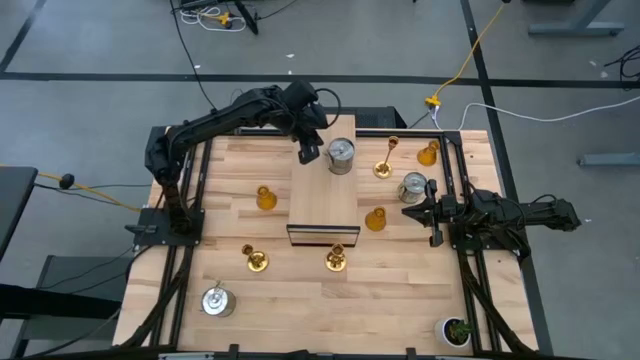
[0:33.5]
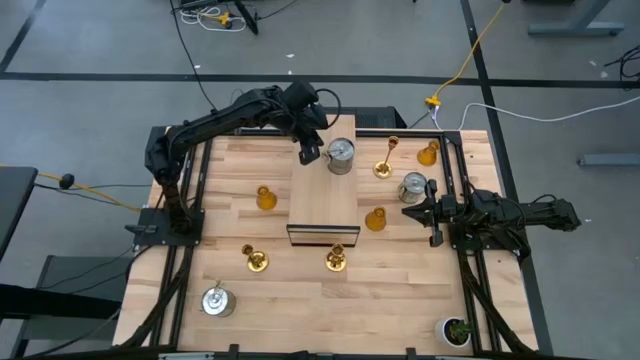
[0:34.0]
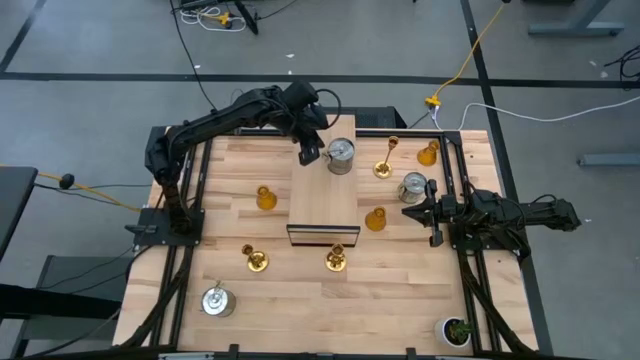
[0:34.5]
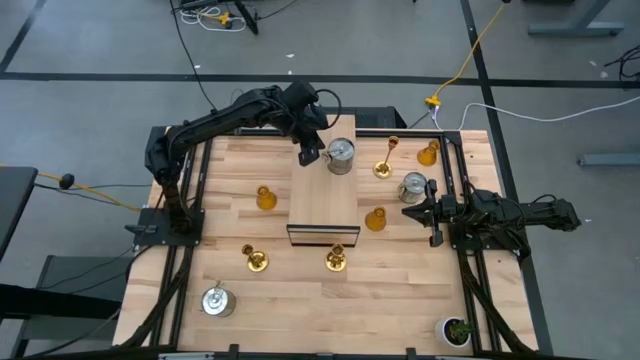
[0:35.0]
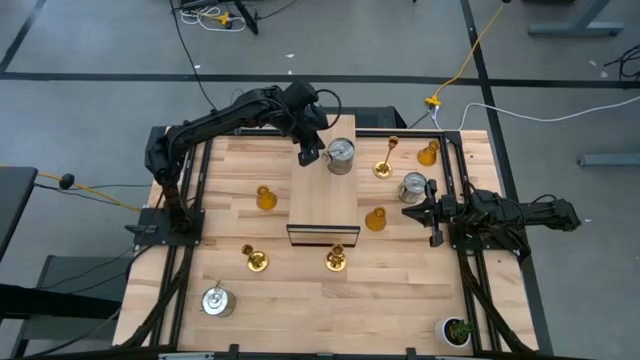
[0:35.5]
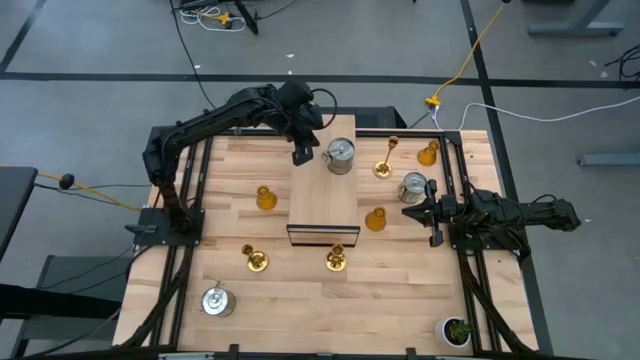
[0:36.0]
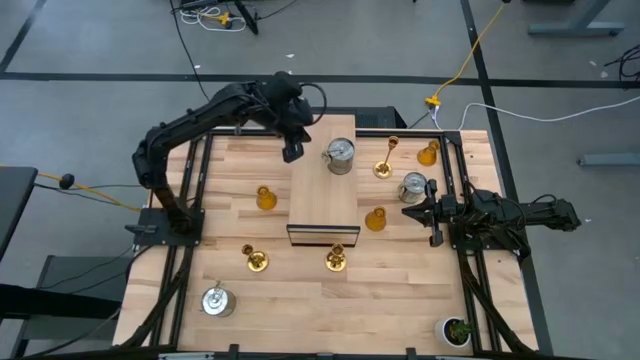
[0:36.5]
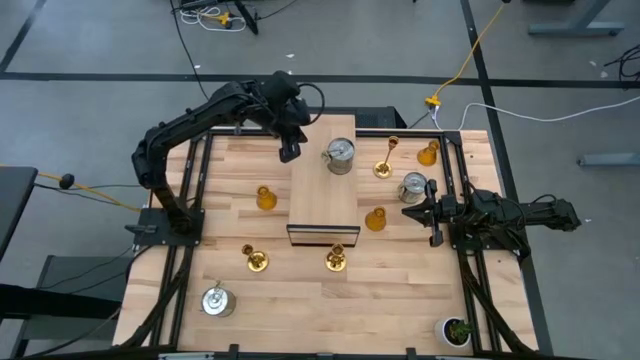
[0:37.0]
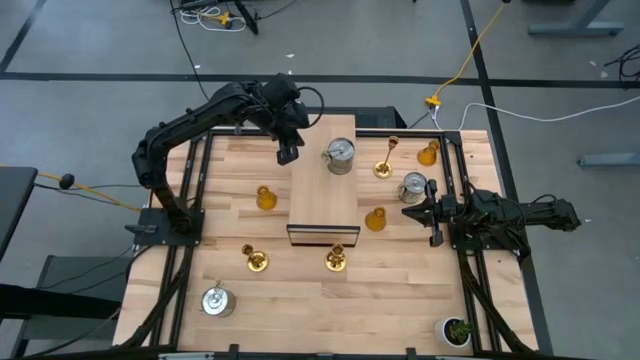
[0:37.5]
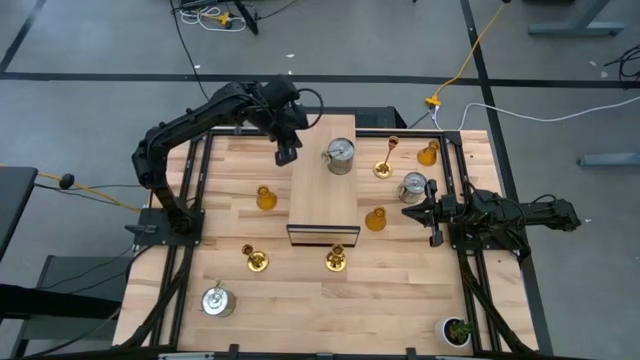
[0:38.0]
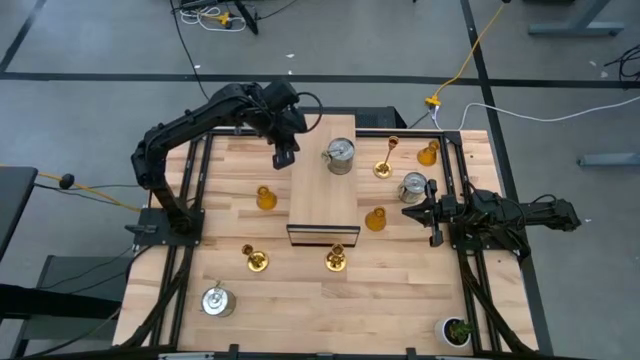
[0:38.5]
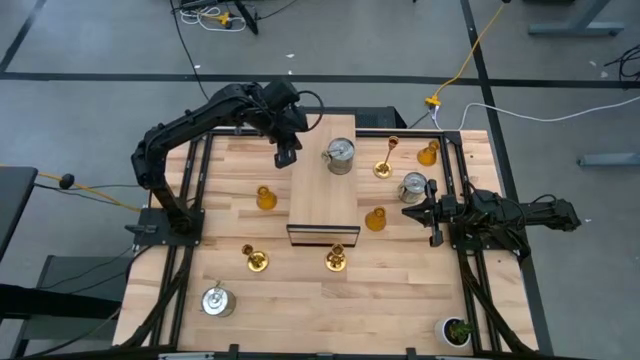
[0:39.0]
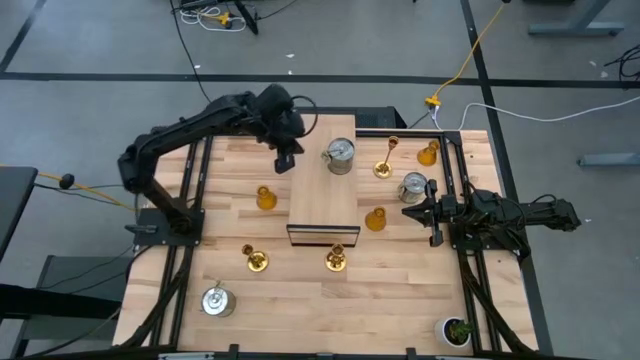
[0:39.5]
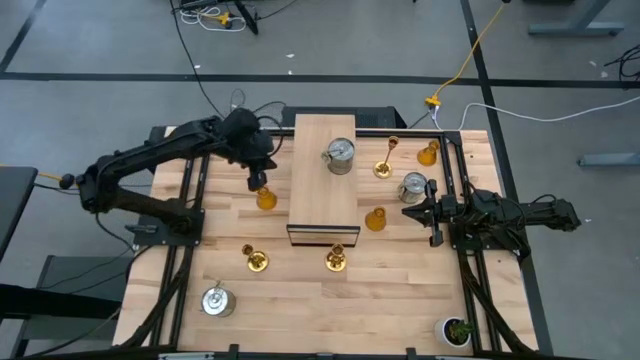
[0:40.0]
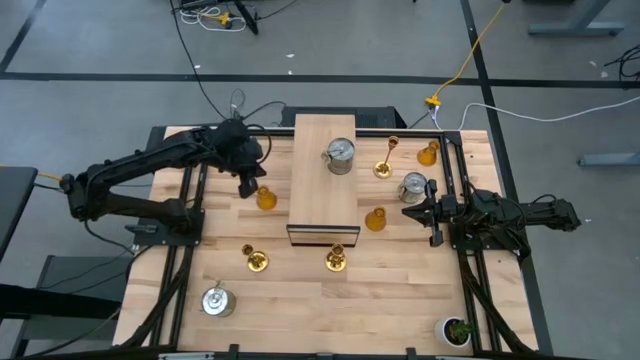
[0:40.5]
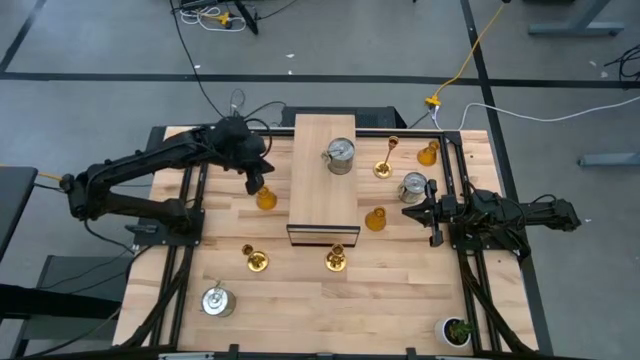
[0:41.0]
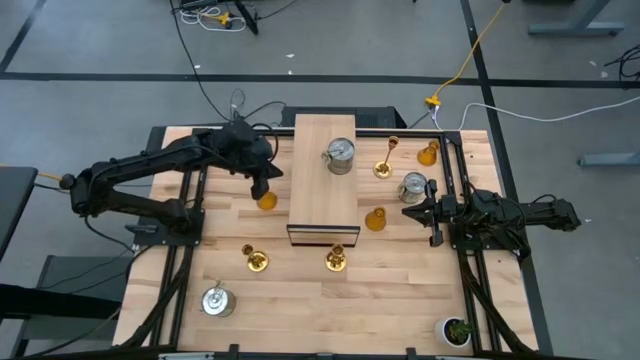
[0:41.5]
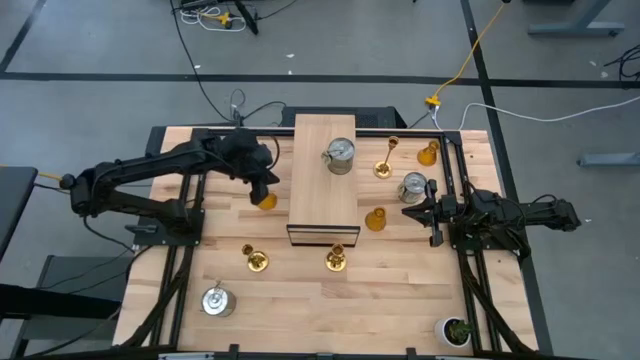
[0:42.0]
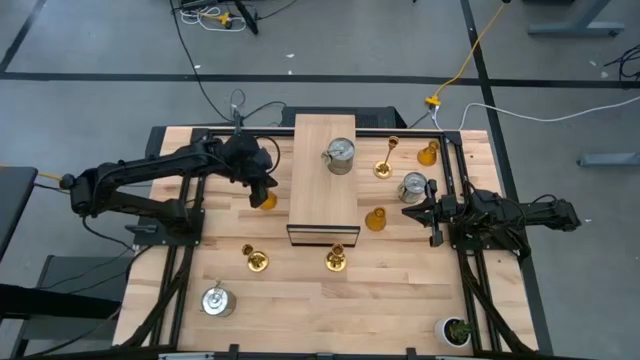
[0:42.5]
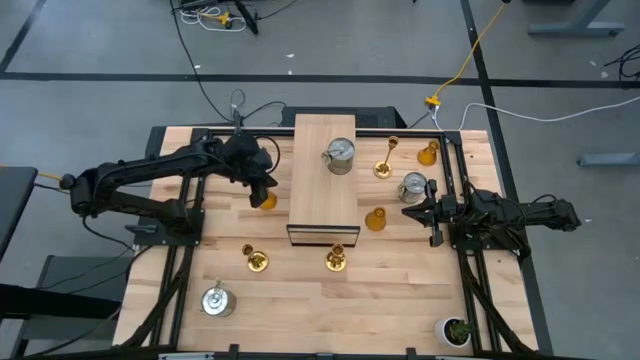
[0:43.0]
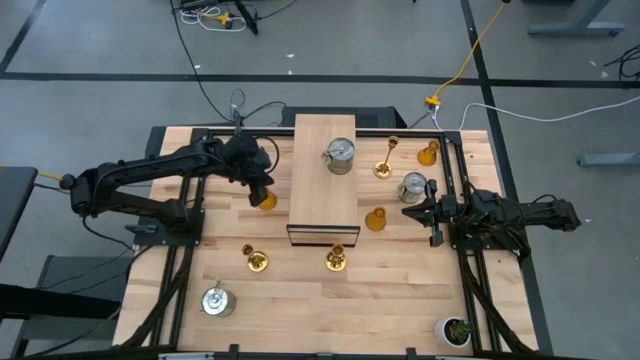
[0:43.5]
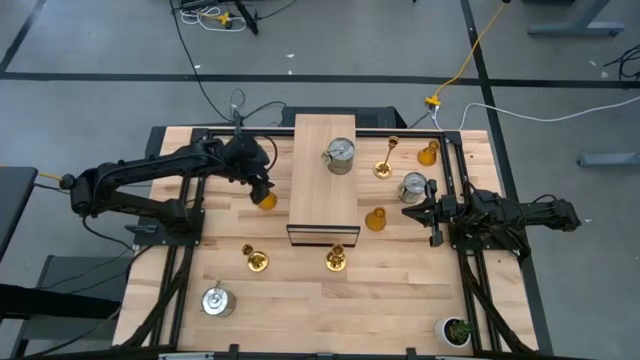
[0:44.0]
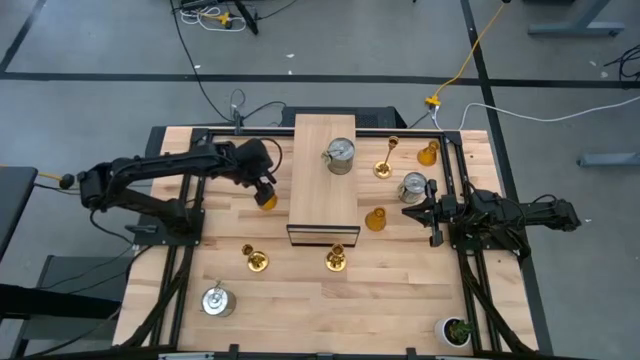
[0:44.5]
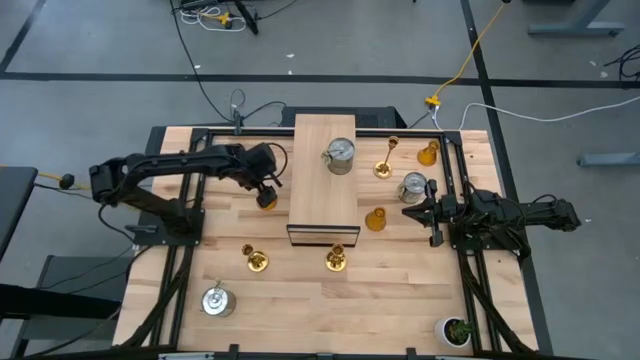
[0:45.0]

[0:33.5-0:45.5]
Task: Pick & Place candle stick holders
Put the left orange glass candle holder on the shelf

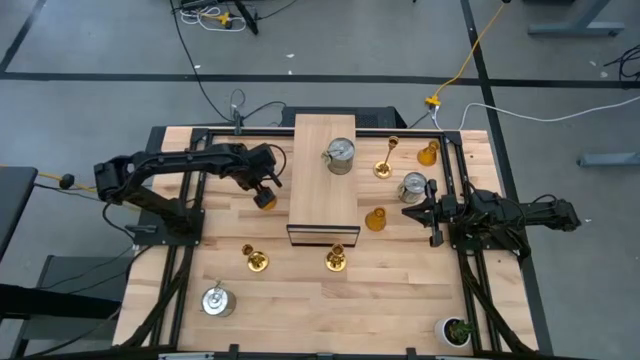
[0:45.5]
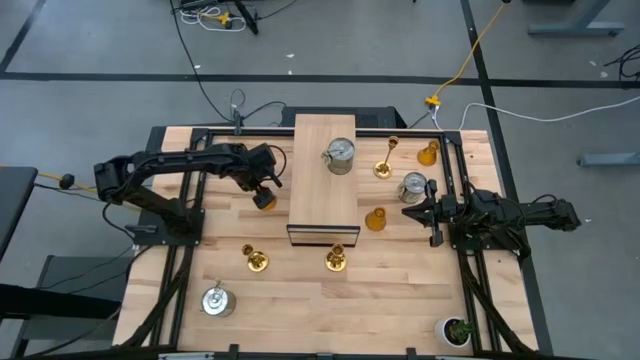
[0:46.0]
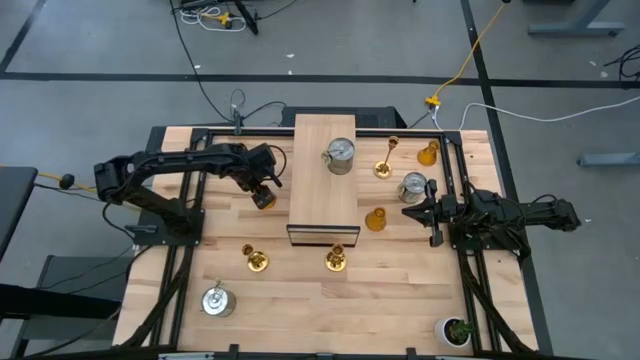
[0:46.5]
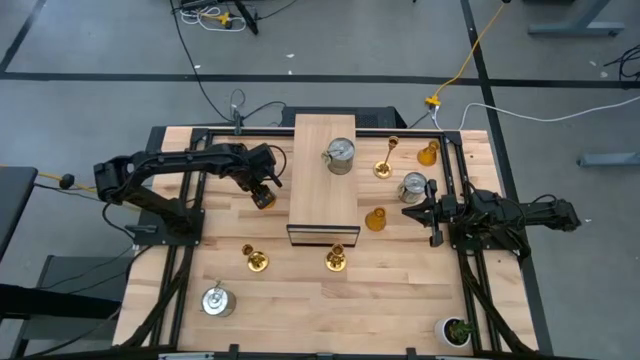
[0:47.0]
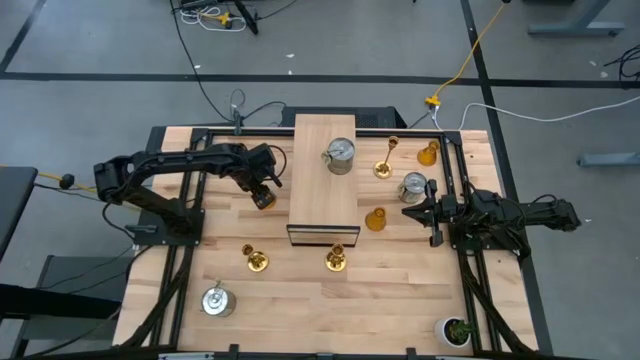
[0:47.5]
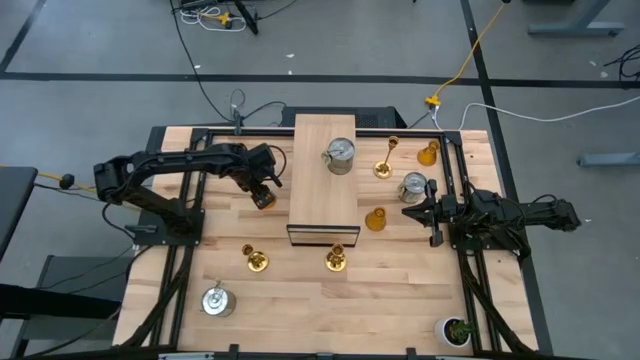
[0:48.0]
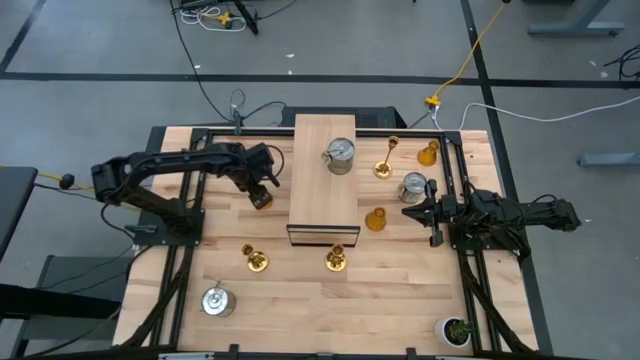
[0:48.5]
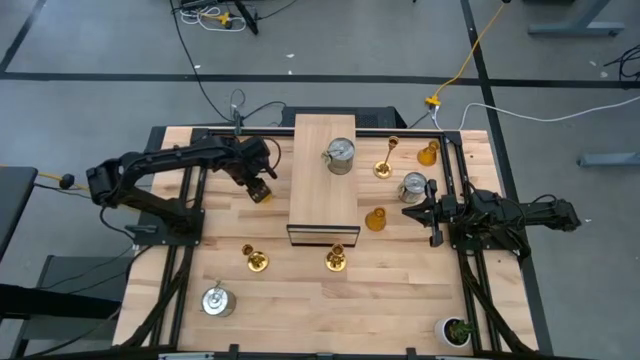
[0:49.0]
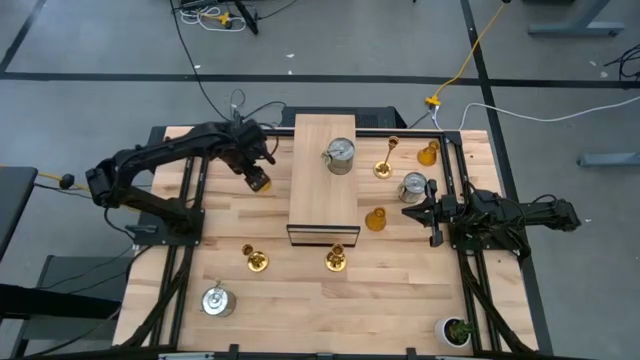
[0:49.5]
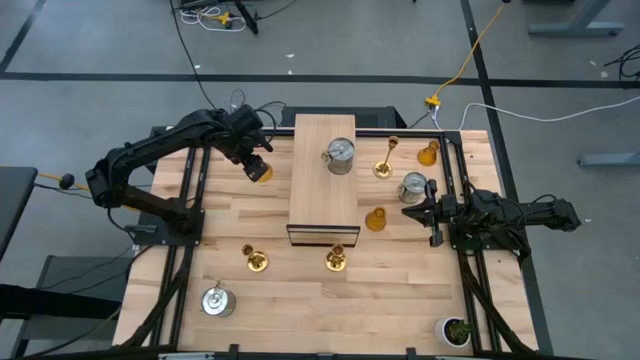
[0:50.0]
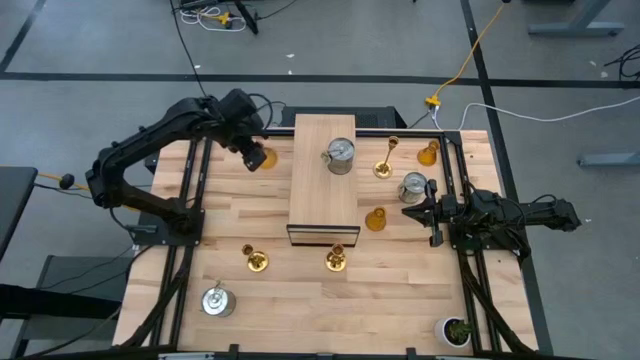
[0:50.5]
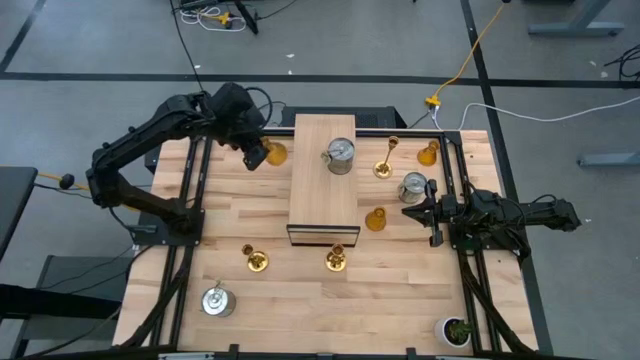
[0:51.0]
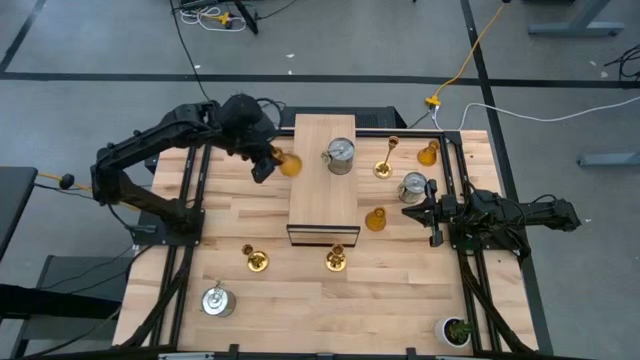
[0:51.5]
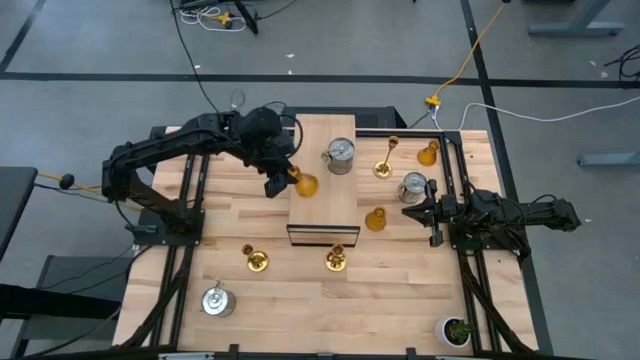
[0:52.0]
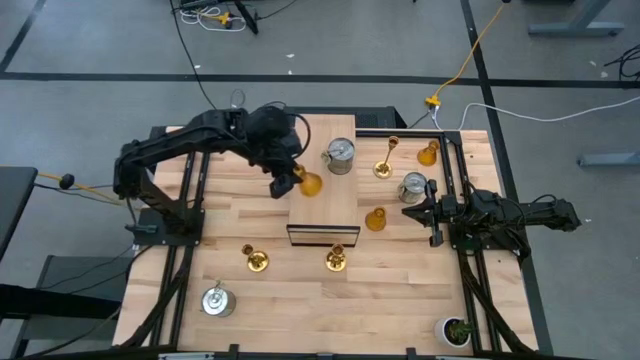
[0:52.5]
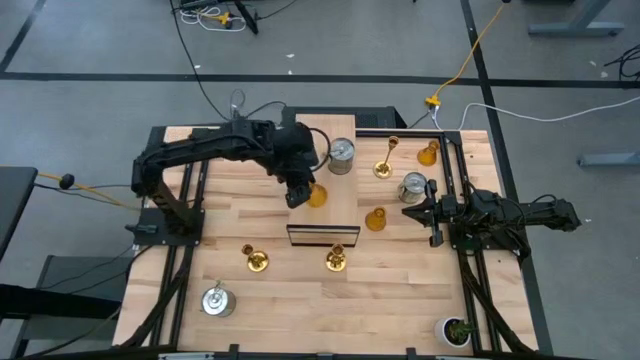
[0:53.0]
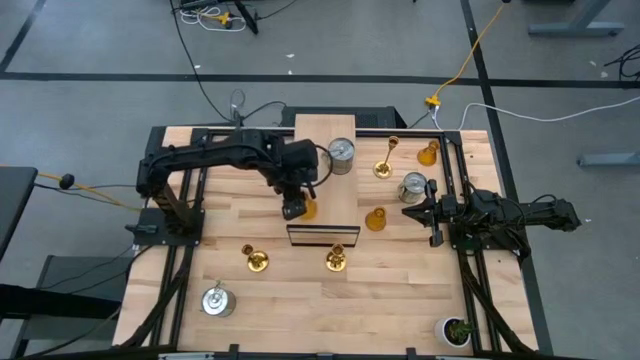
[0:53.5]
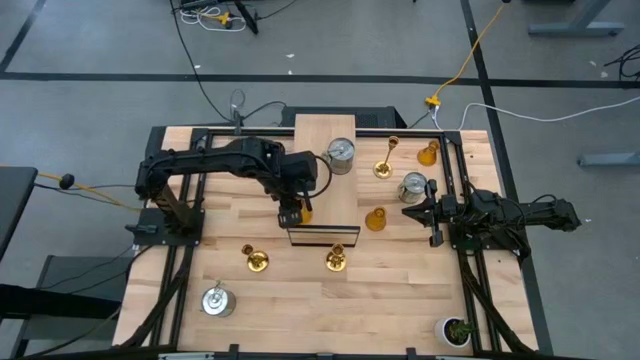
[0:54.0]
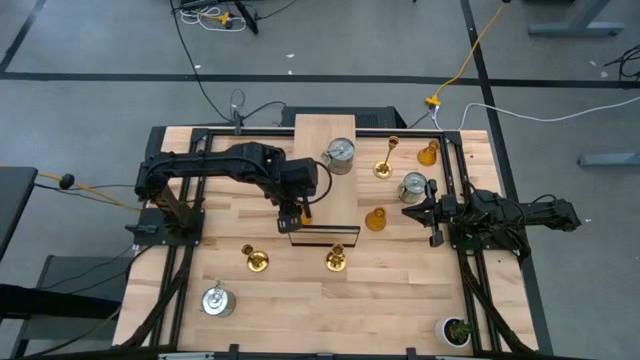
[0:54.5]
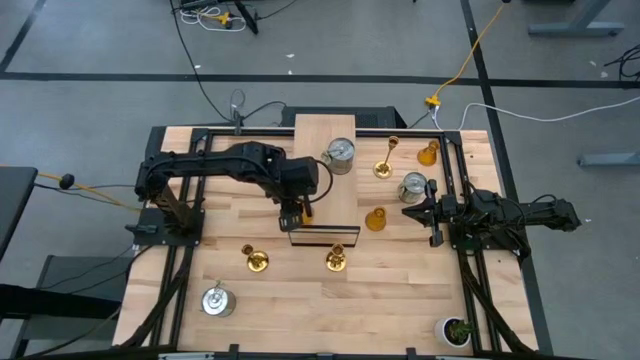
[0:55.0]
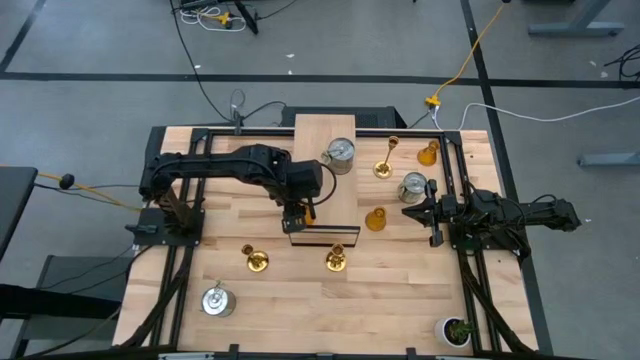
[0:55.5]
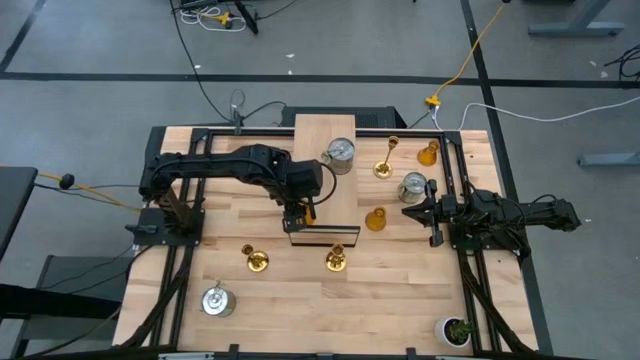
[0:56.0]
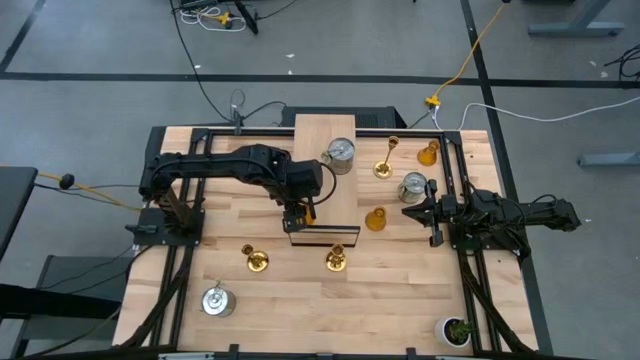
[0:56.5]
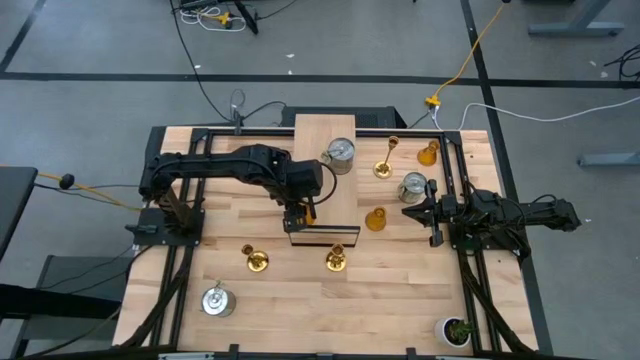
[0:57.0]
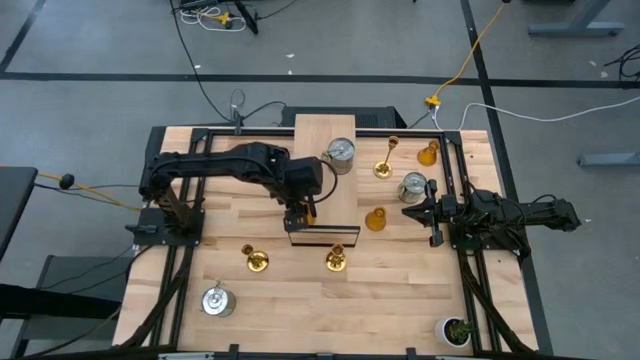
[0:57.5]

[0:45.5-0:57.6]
Put the left orange glass candle holder on the shelf
